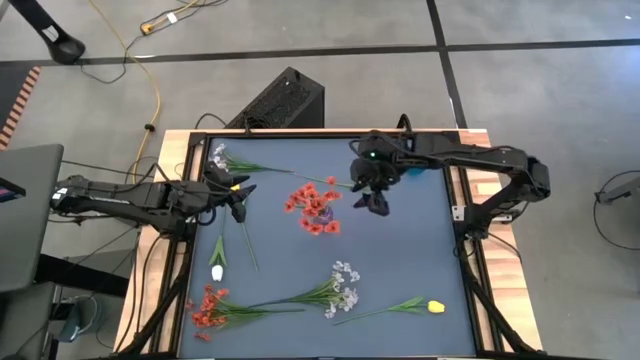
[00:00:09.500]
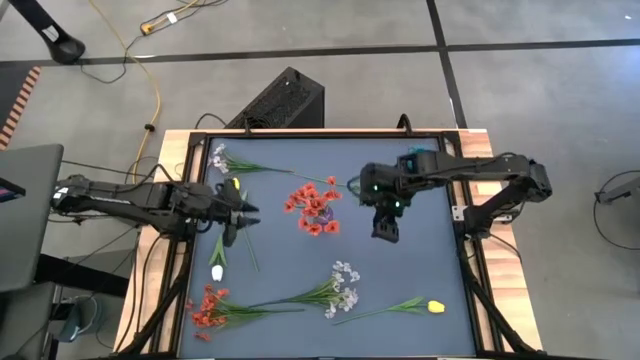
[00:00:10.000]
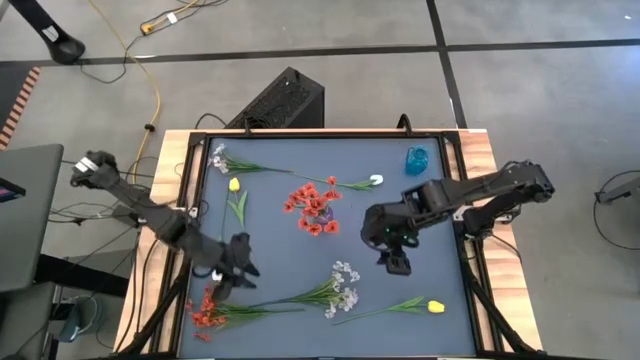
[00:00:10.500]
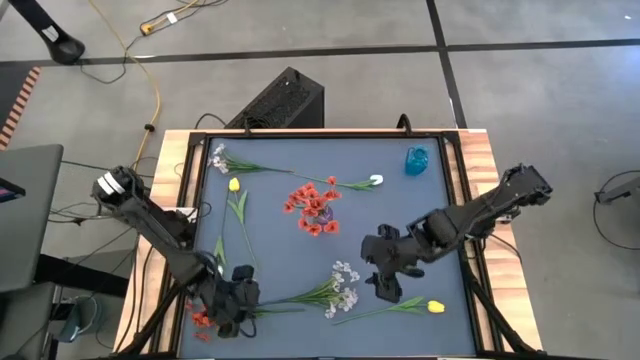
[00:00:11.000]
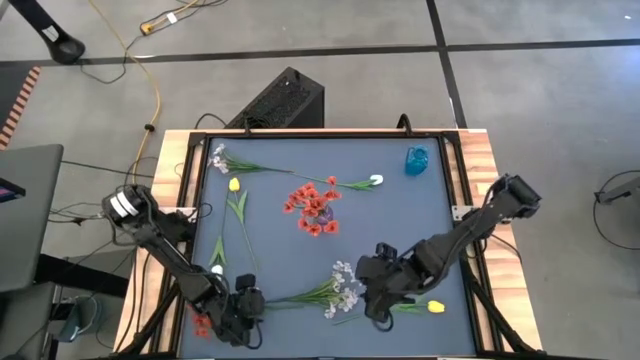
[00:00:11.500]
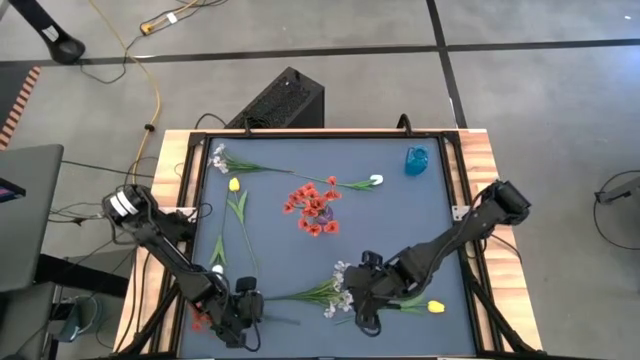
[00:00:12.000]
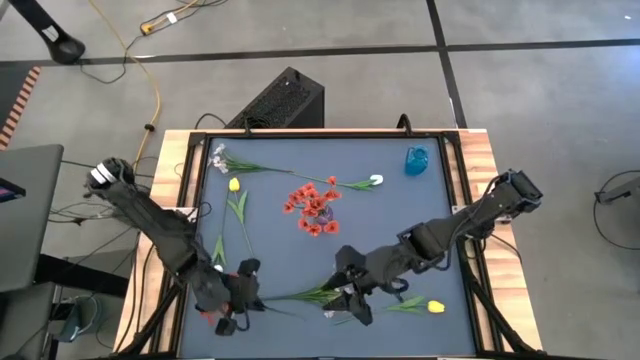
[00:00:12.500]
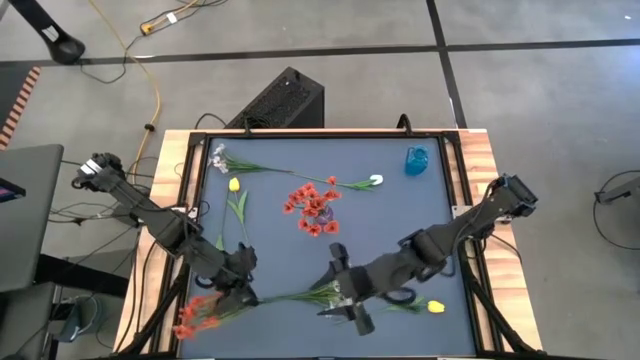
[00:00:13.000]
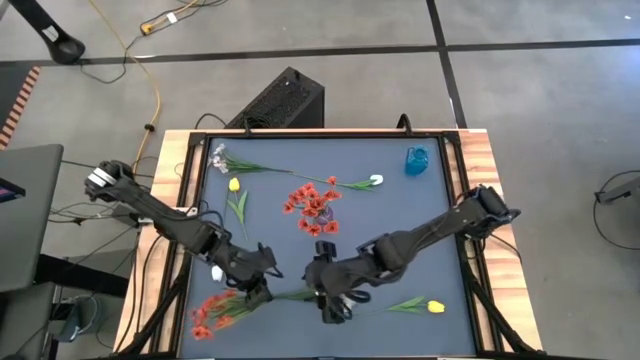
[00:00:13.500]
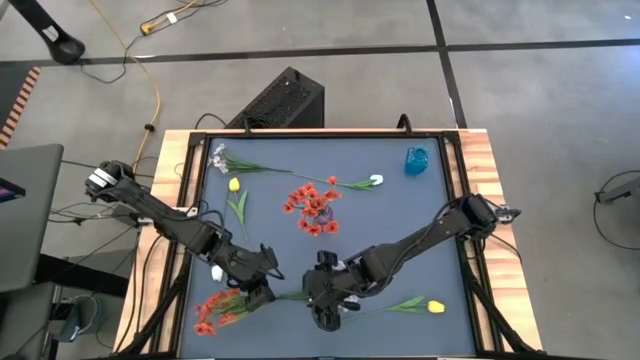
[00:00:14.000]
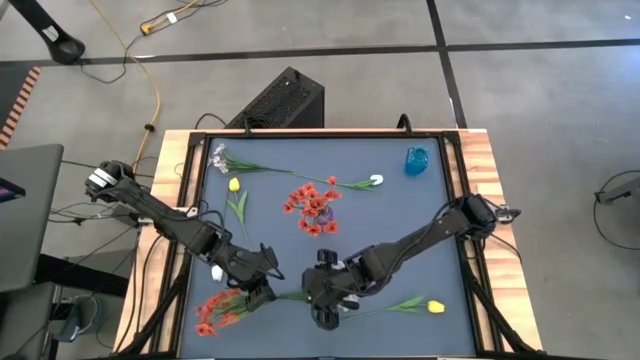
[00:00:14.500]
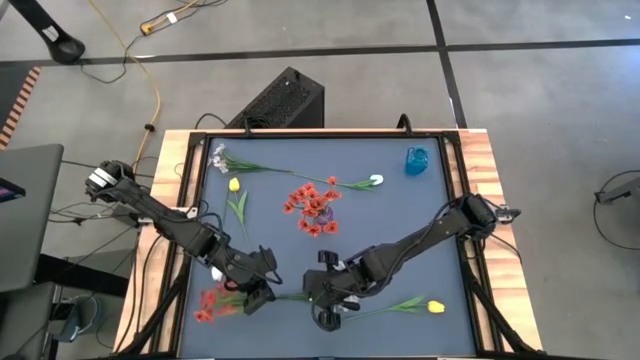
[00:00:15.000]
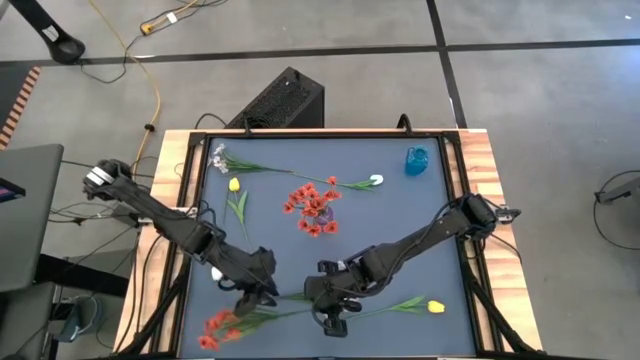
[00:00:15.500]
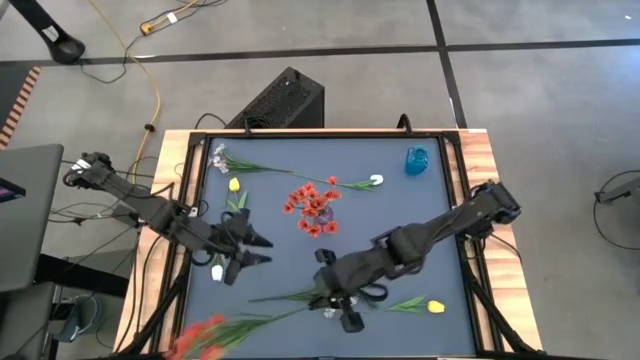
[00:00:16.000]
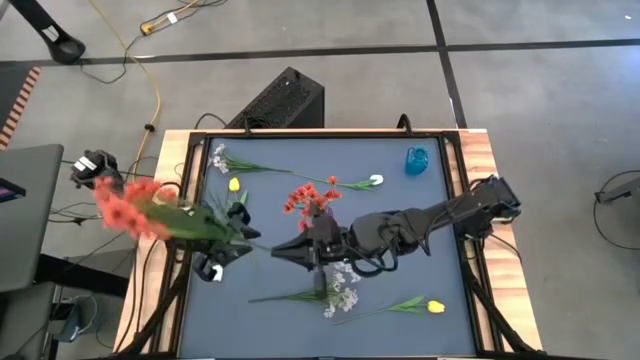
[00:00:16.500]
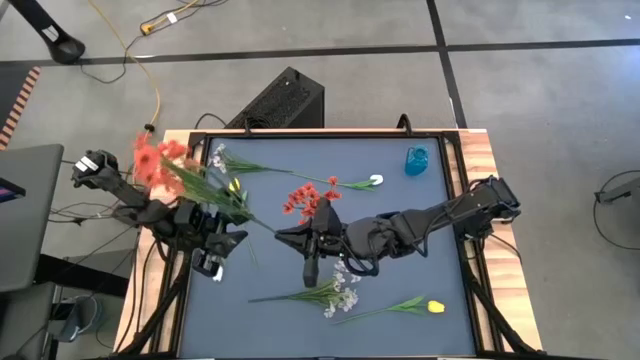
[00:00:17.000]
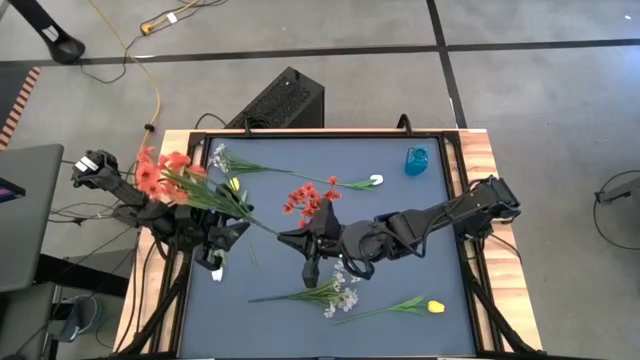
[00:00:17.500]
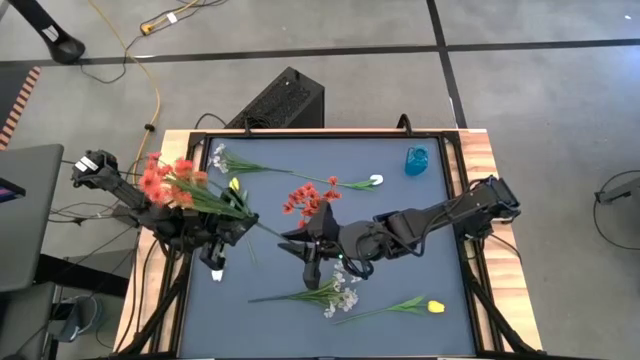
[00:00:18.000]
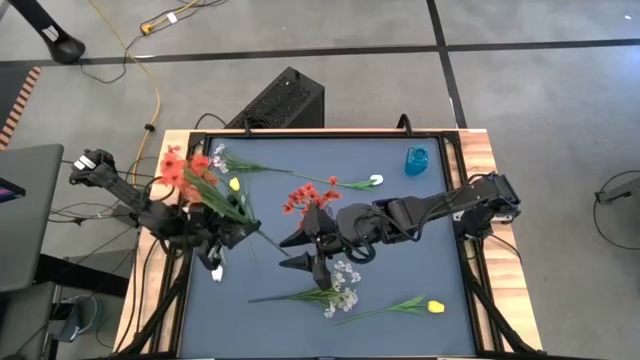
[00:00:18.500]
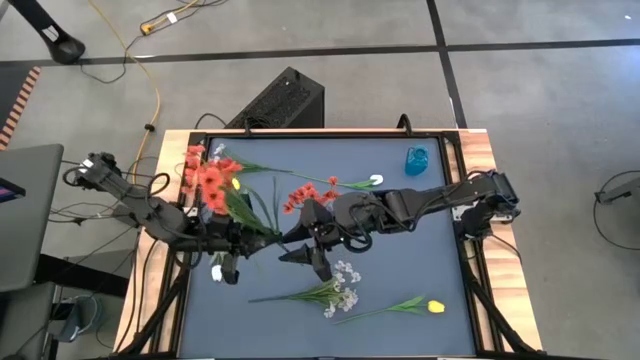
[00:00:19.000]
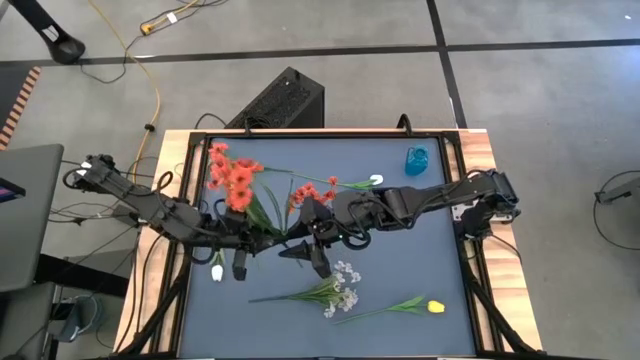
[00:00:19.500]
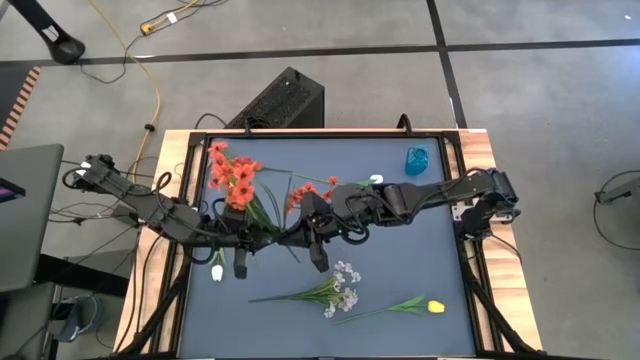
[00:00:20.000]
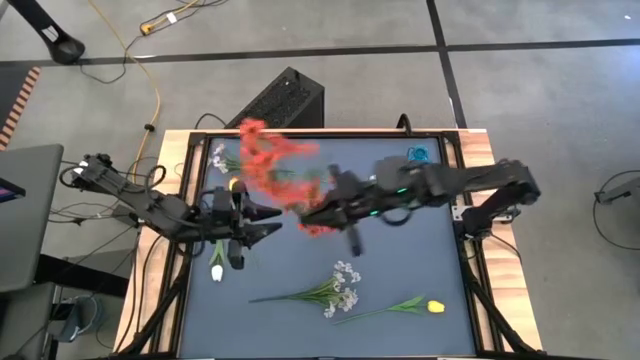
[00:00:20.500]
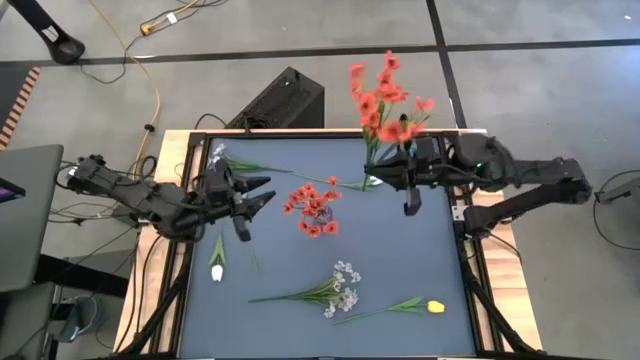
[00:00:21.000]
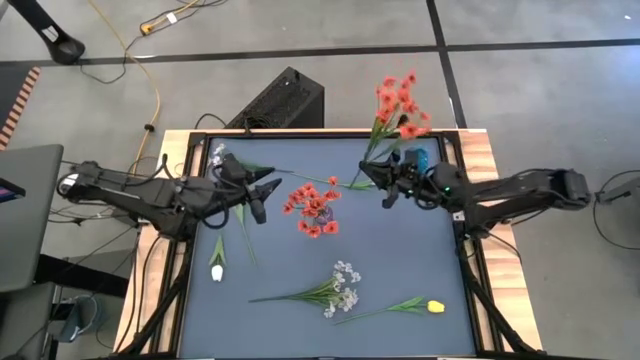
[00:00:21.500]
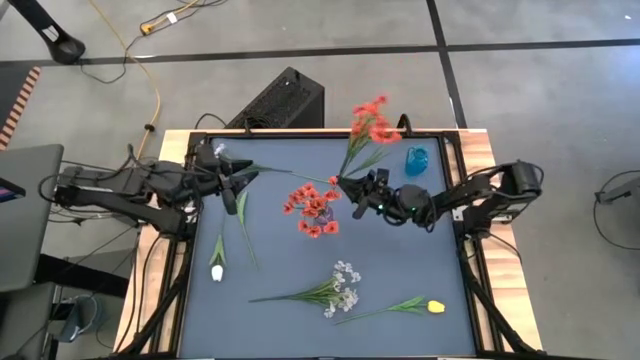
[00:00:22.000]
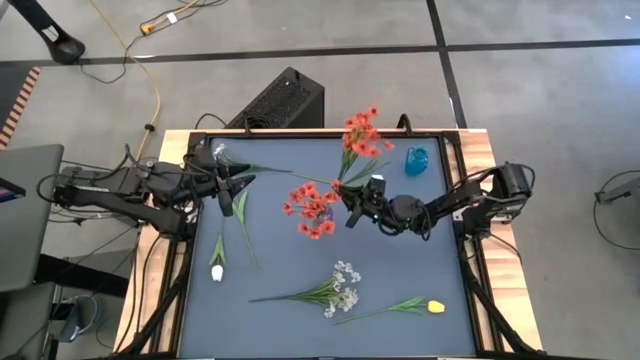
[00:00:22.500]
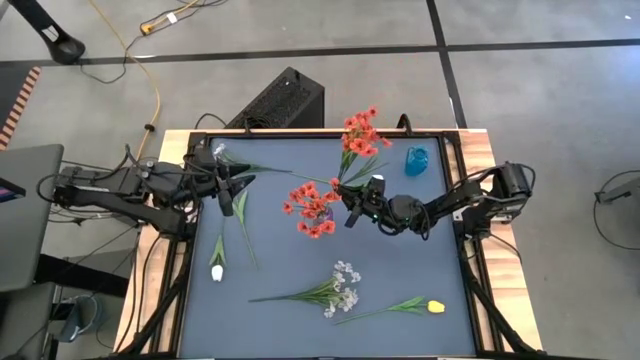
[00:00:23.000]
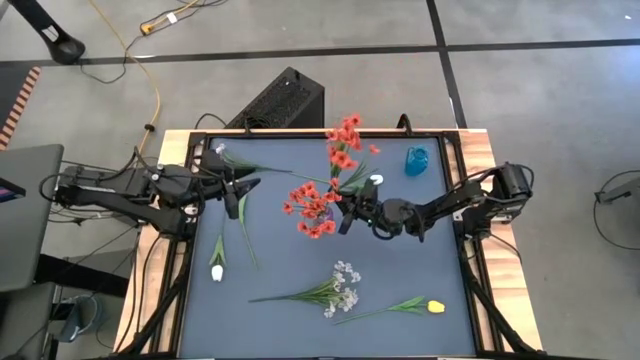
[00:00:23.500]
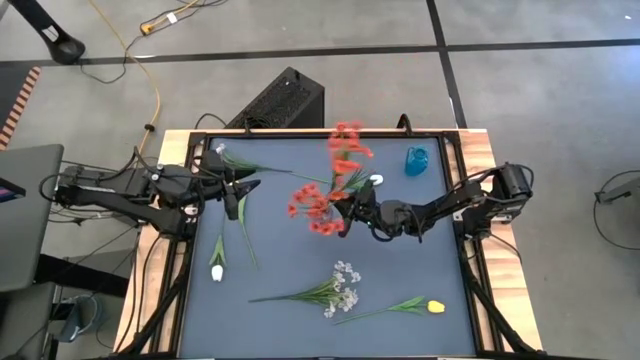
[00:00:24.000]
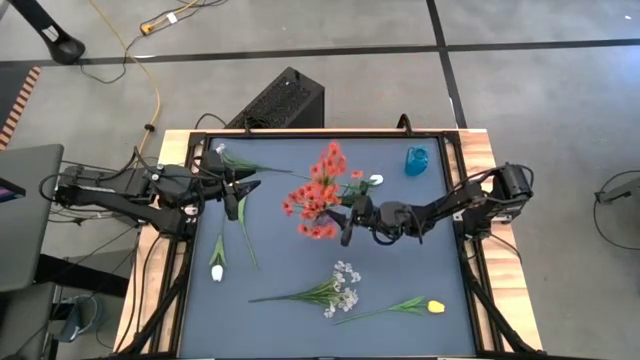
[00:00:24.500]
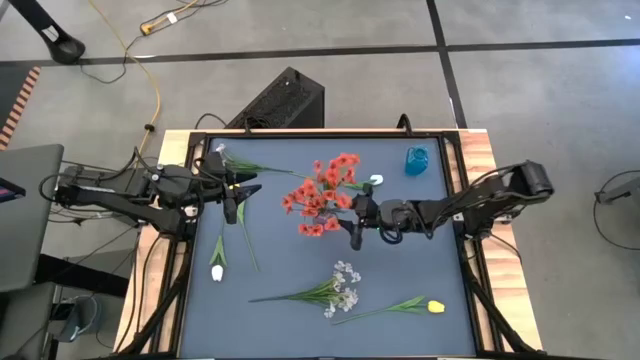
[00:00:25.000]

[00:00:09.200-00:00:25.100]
Task: Sort flowers into vase by color
Put the orange flower into the pink vase
